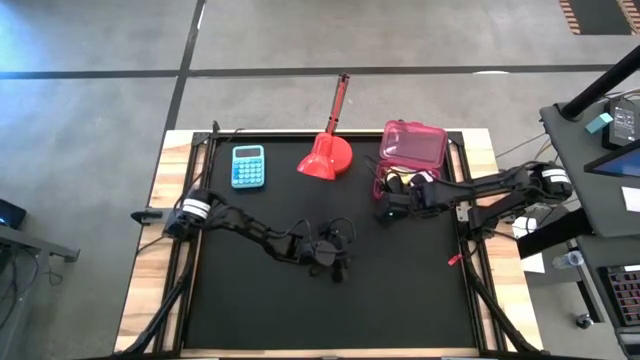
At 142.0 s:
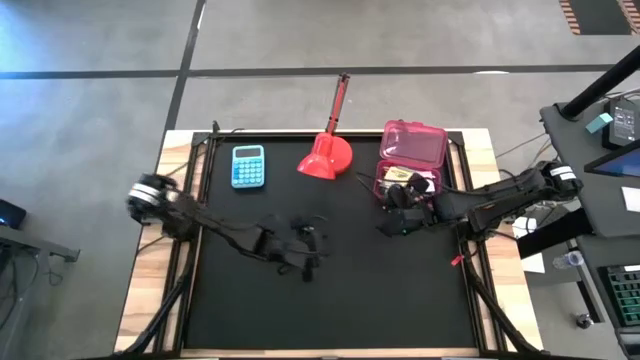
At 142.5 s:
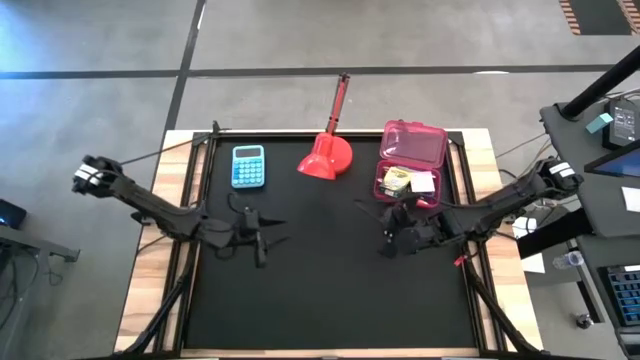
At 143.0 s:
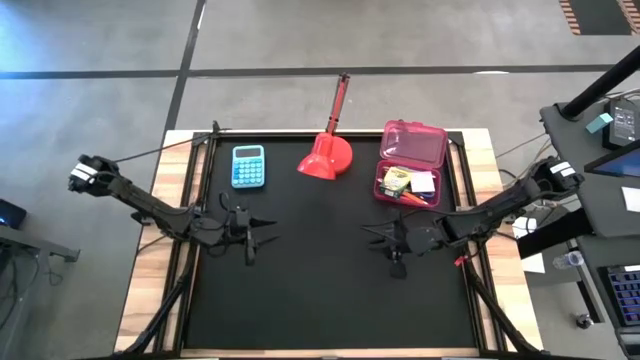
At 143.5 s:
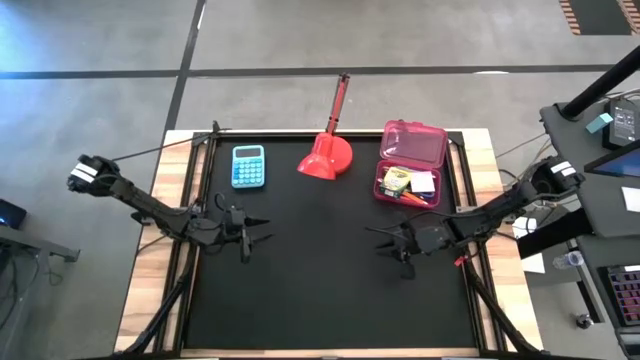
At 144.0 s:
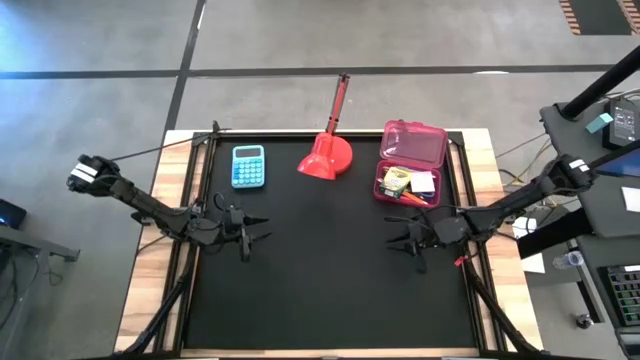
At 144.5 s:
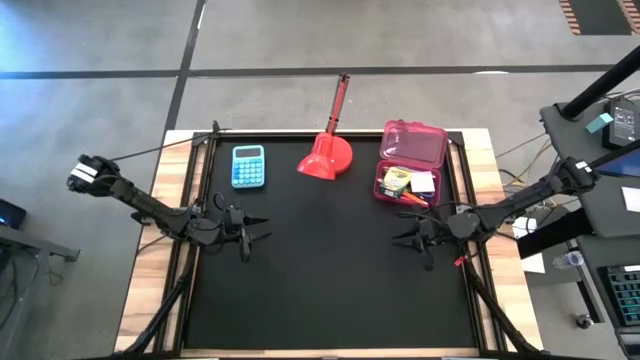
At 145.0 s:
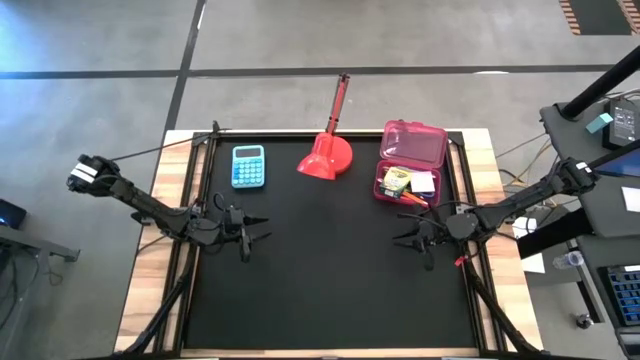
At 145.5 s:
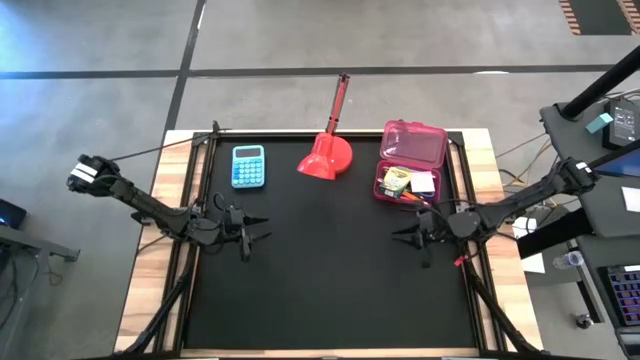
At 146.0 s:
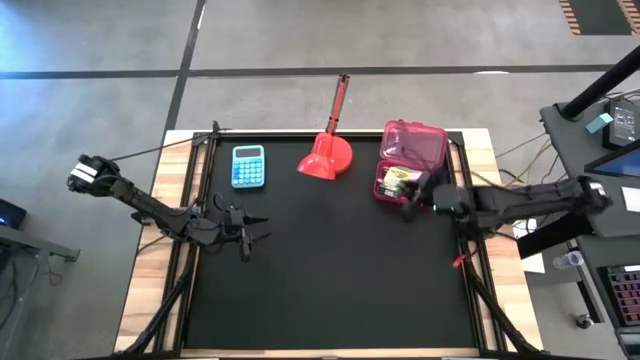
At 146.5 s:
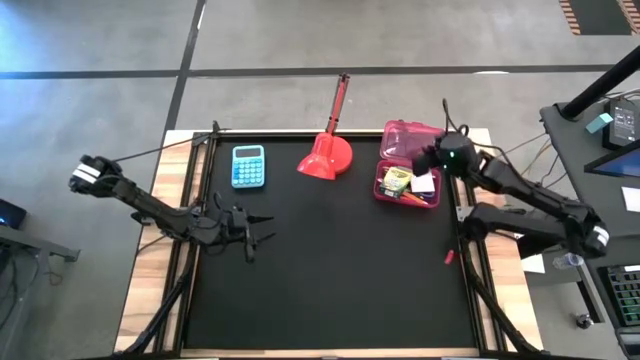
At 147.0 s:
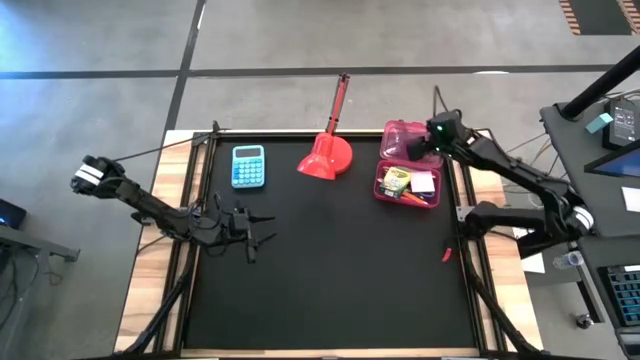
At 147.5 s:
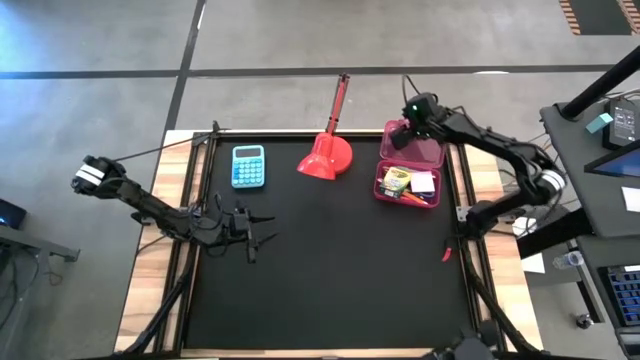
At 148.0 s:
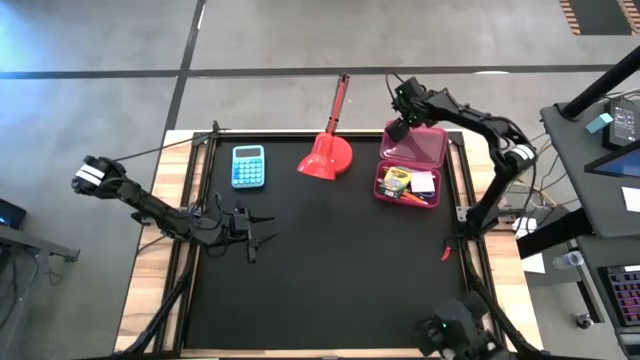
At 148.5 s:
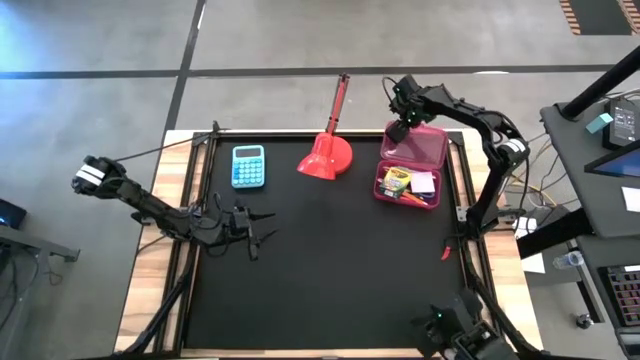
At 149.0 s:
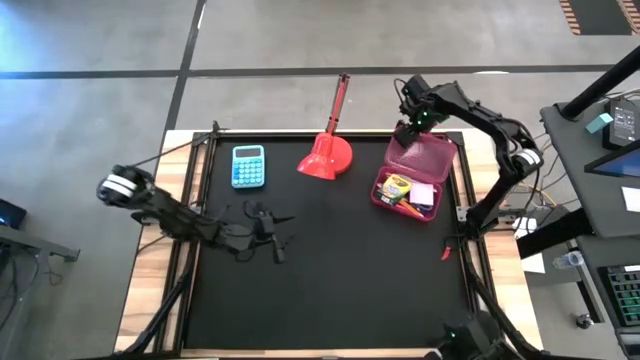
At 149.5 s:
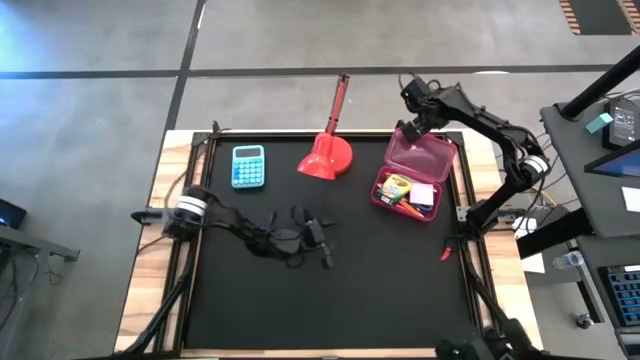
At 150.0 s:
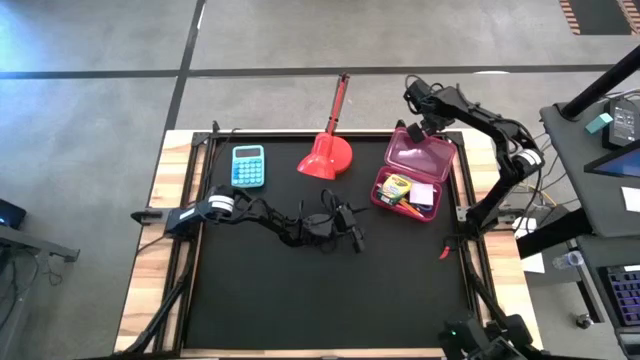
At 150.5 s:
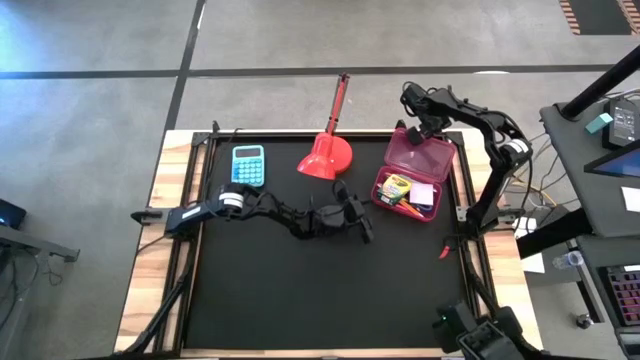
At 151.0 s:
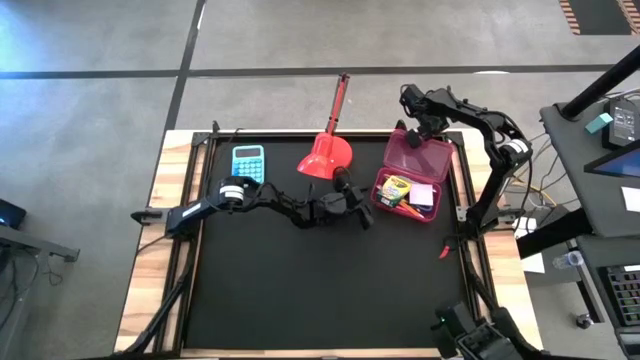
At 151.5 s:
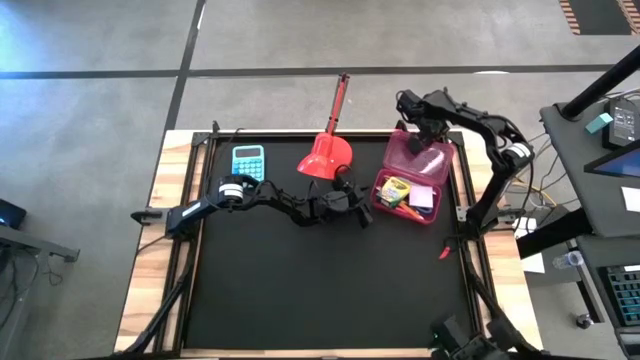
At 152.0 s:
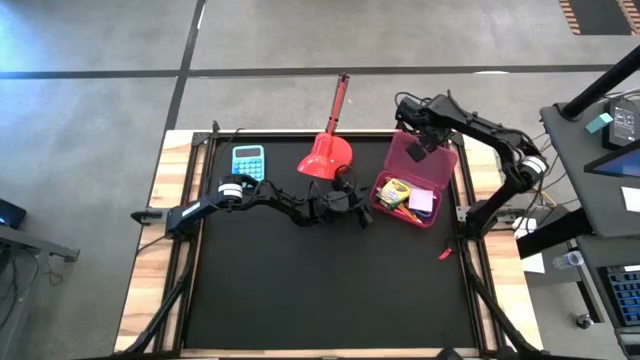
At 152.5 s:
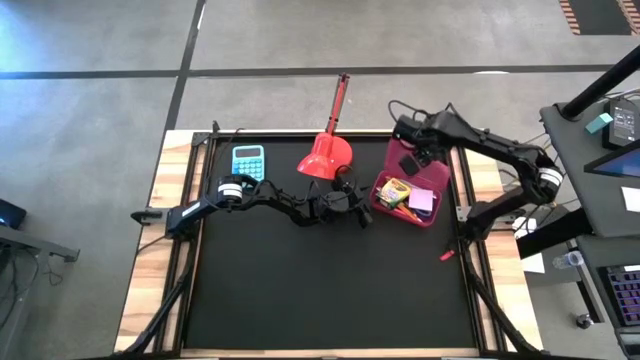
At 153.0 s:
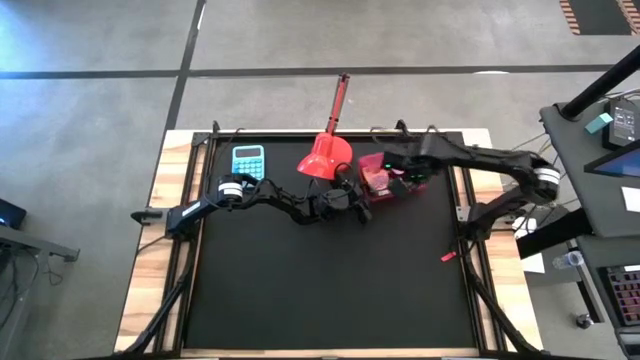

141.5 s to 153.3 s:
Task: Pack school essentials
Close the pink supply box

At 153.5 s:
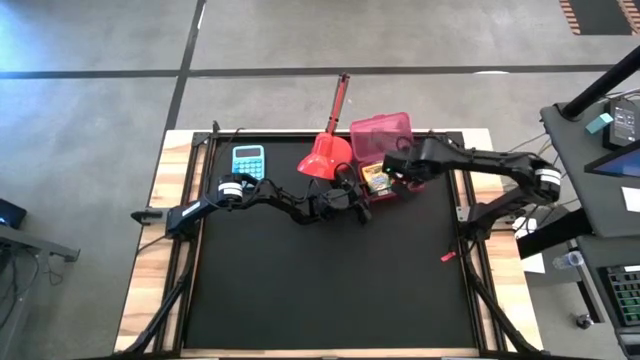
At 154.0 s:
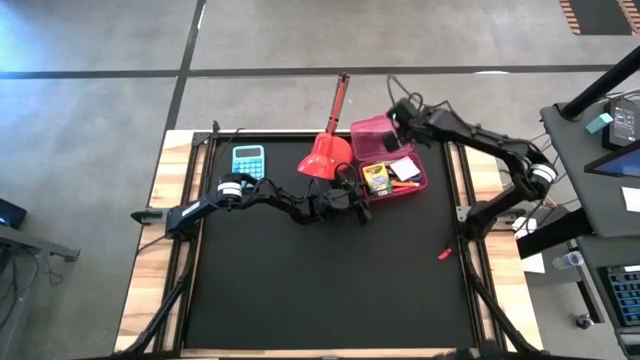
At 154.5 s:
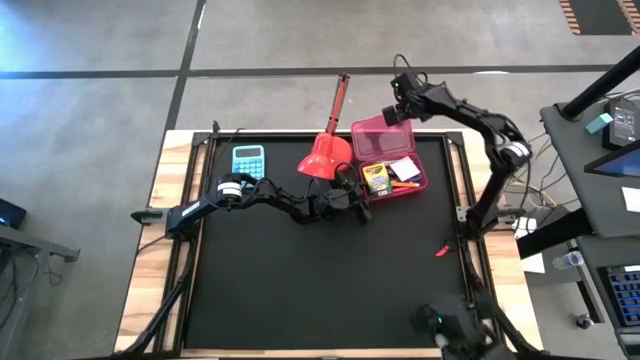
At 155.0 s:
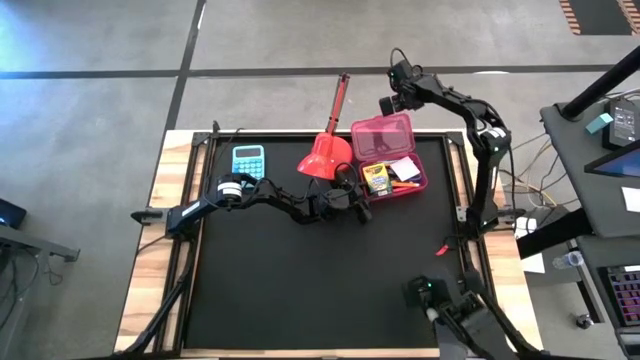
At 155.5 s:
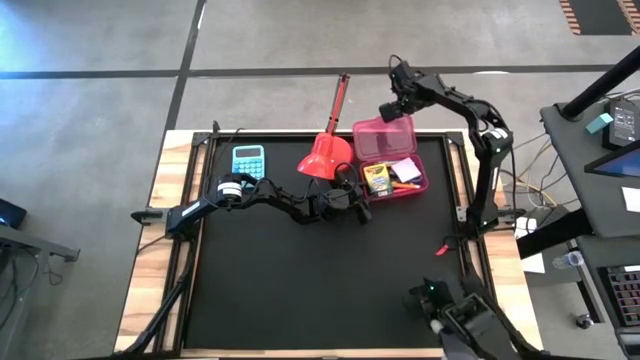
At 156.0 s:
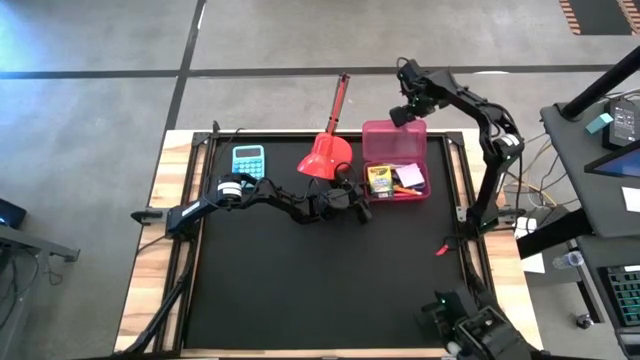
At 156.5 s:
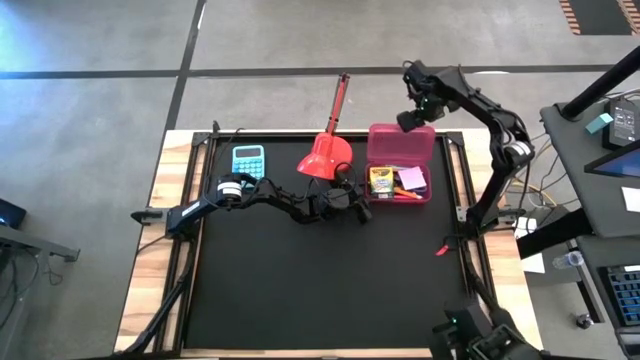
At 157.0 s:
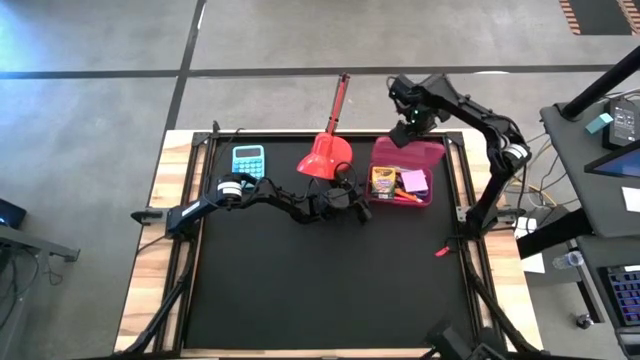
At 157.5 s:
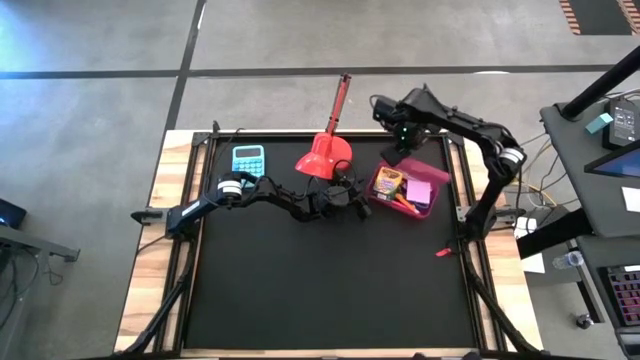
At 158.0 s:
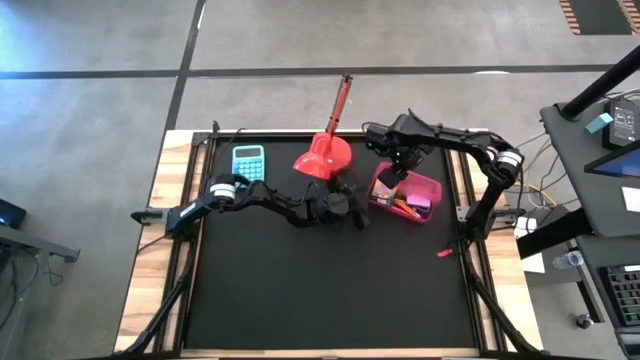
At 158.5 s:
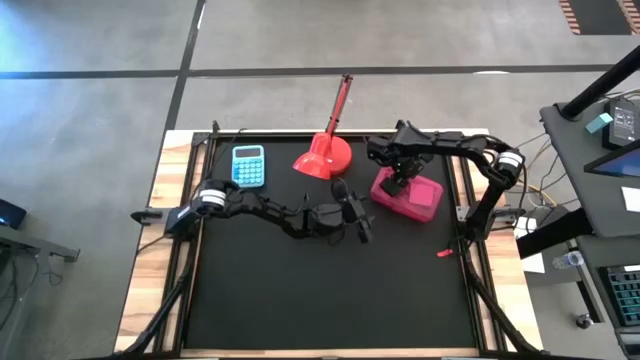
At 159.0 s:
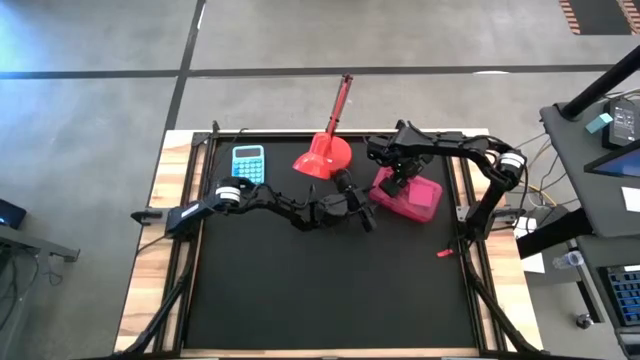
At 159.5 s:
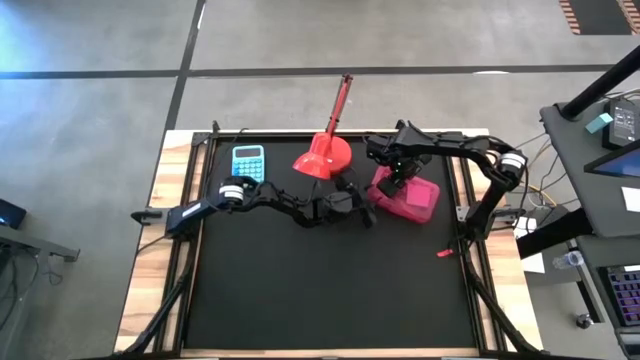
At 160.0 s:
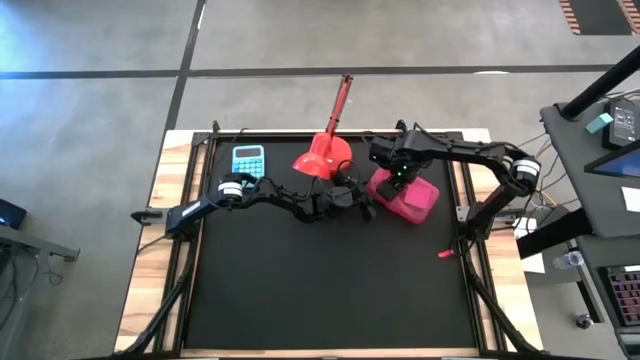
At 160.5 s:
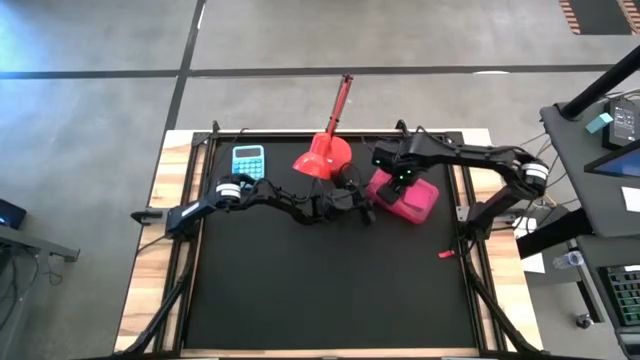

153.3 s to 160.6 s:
Close the pink supply box

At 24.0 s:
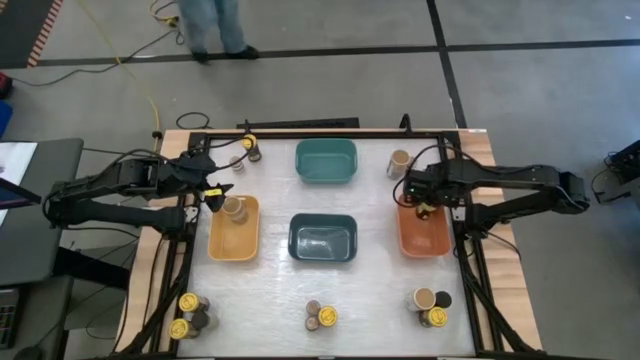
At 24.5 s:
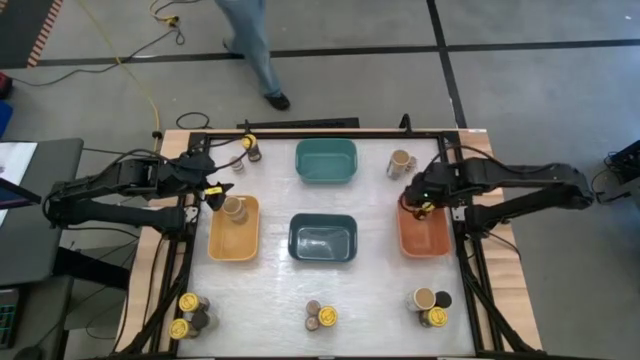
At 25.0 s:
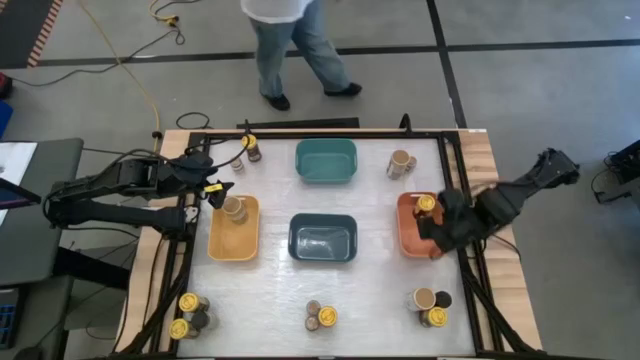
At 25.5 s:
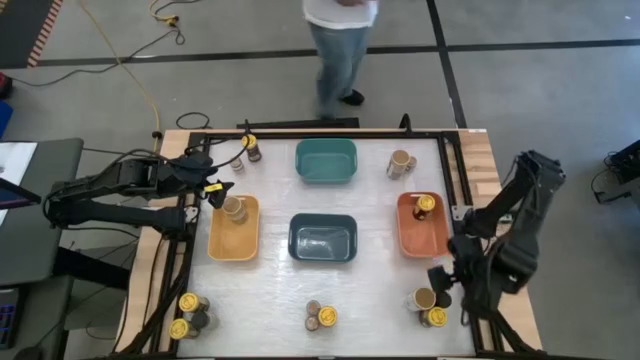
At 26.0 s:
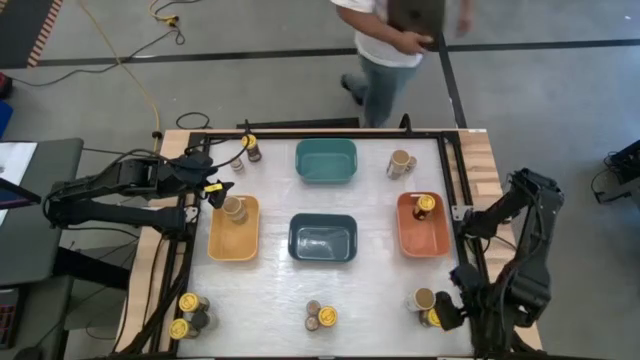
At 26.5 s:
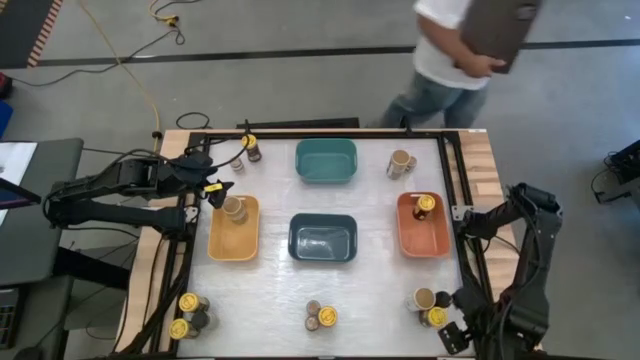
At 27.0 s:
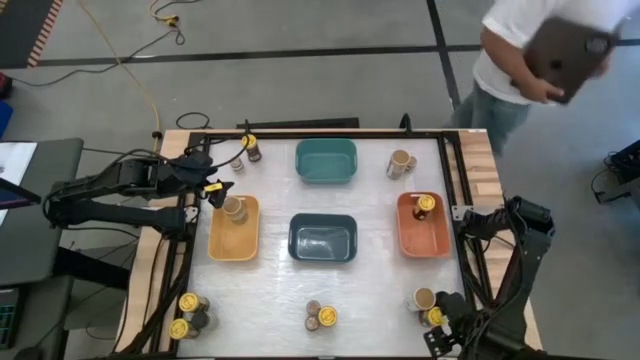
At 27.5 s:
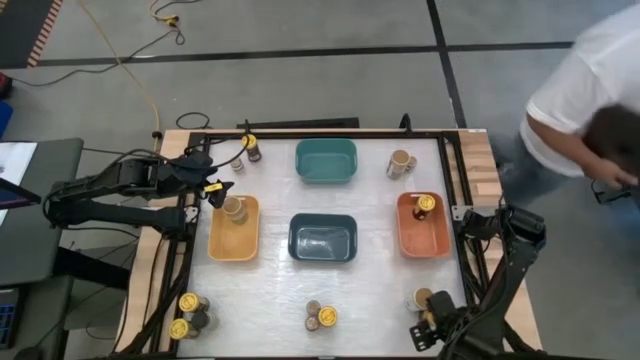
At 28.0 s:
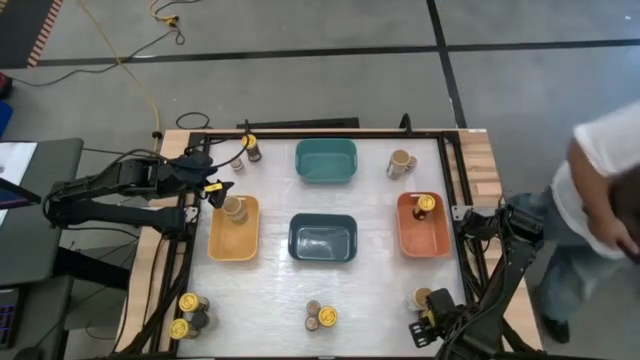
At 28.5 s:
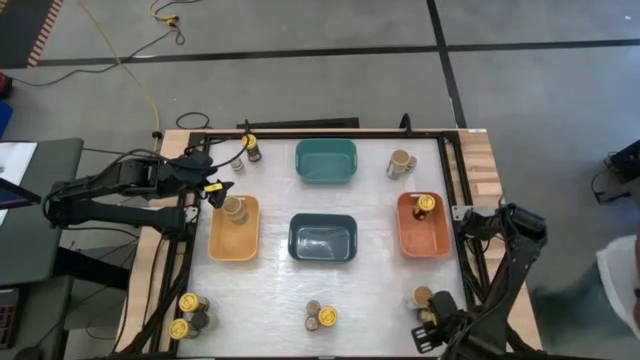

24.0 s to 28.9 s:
Task: Sort spices by type
Put the yellow seasoning bottle into the orange bin
